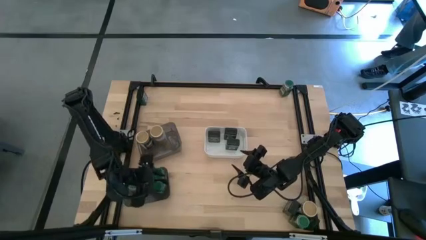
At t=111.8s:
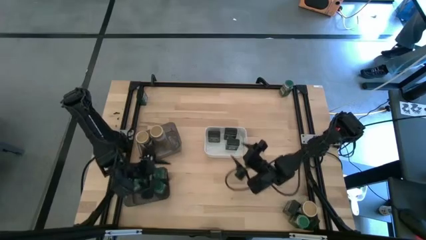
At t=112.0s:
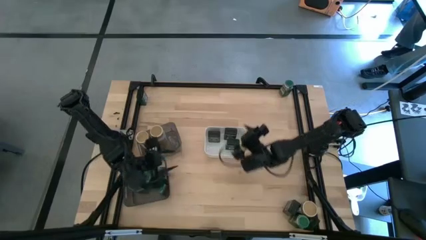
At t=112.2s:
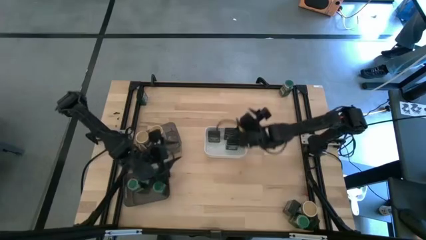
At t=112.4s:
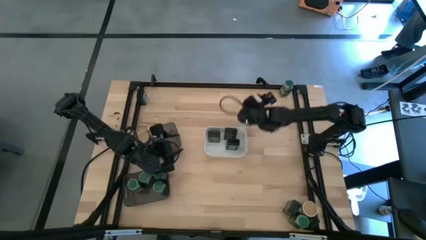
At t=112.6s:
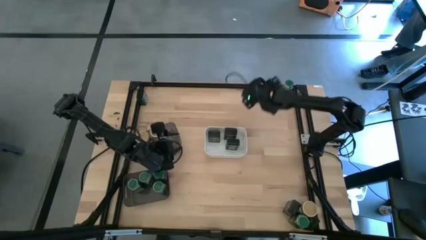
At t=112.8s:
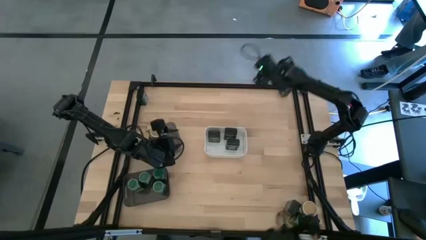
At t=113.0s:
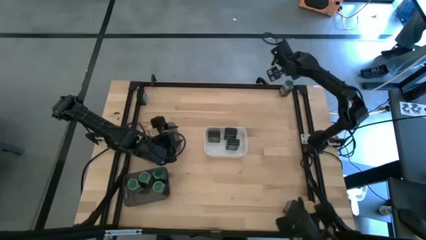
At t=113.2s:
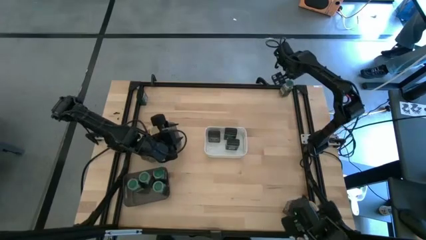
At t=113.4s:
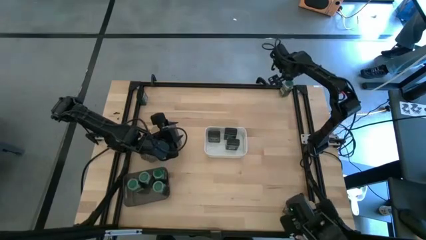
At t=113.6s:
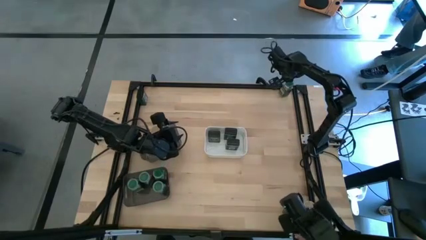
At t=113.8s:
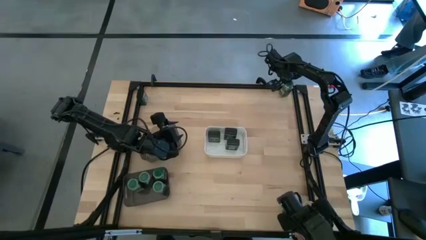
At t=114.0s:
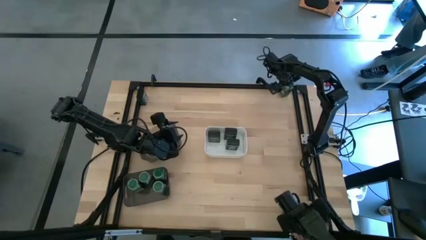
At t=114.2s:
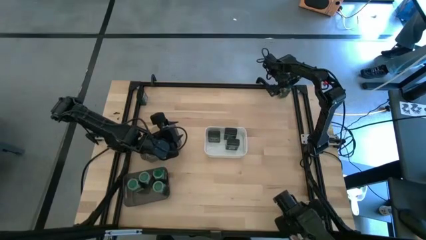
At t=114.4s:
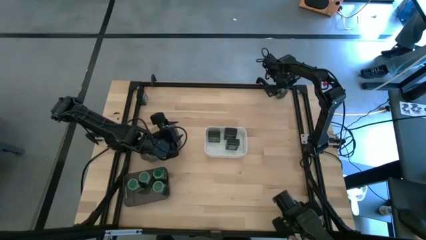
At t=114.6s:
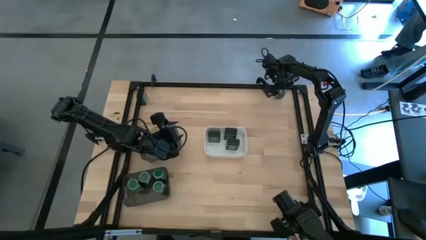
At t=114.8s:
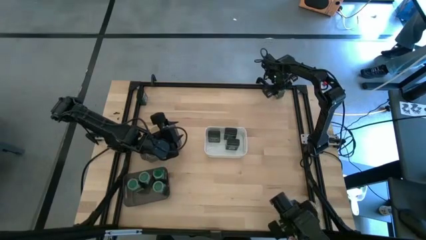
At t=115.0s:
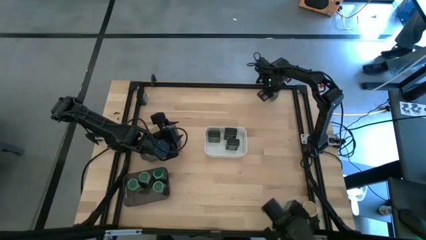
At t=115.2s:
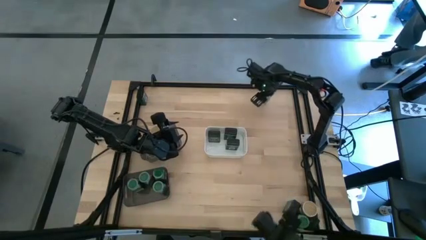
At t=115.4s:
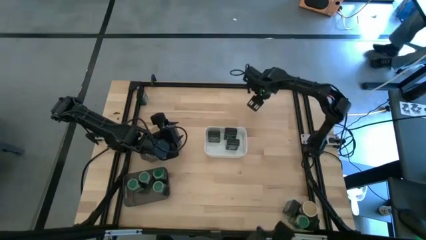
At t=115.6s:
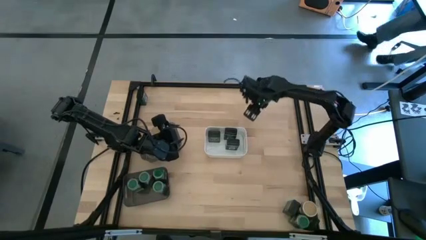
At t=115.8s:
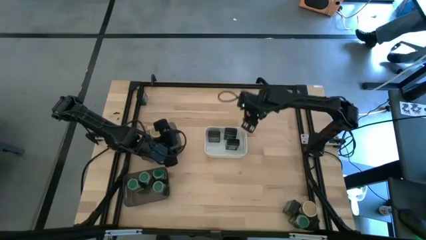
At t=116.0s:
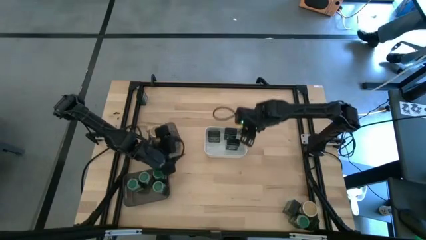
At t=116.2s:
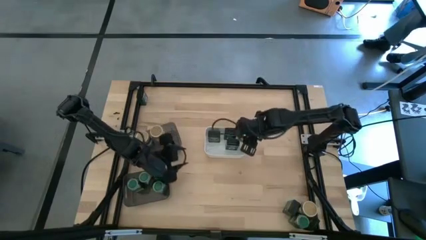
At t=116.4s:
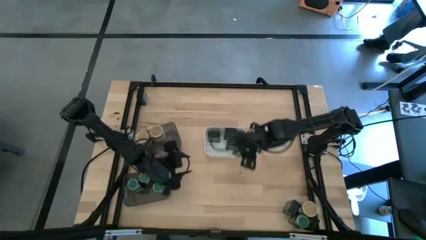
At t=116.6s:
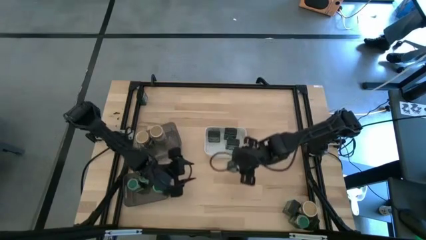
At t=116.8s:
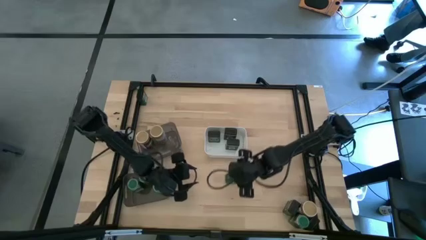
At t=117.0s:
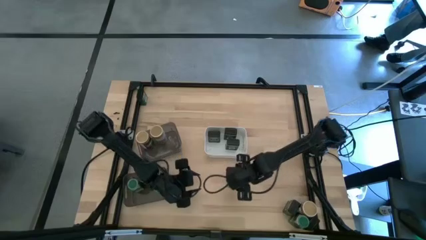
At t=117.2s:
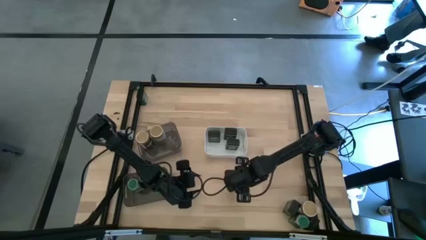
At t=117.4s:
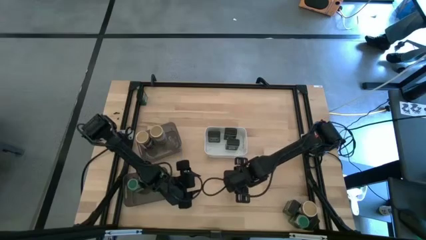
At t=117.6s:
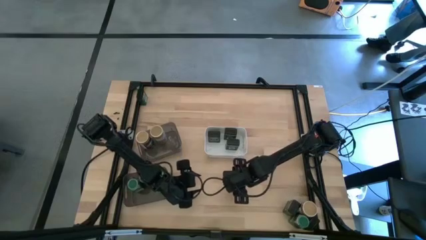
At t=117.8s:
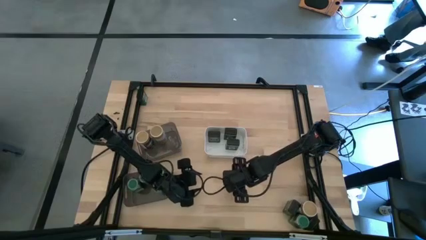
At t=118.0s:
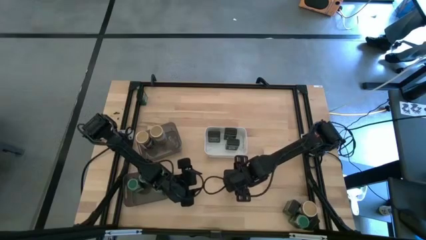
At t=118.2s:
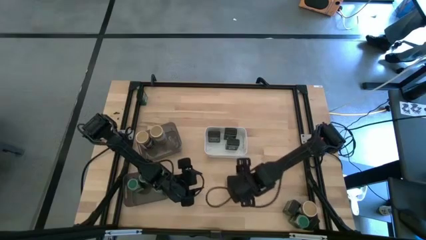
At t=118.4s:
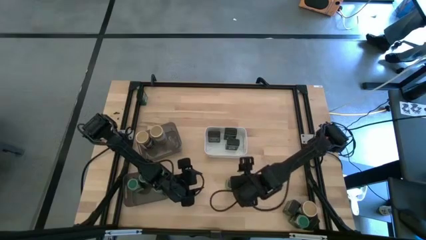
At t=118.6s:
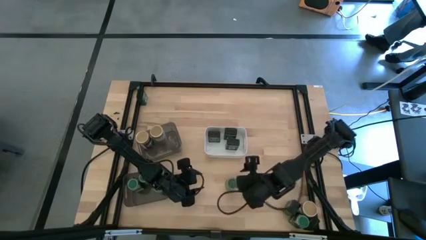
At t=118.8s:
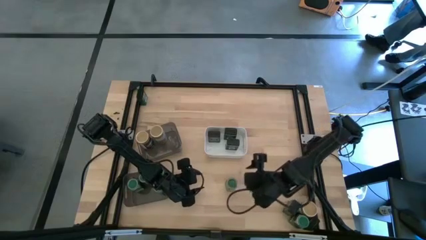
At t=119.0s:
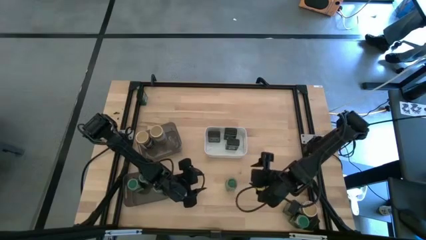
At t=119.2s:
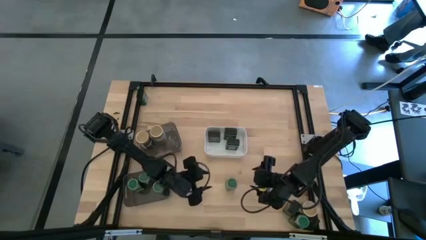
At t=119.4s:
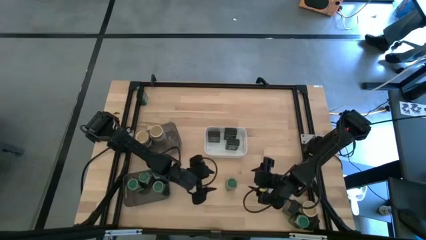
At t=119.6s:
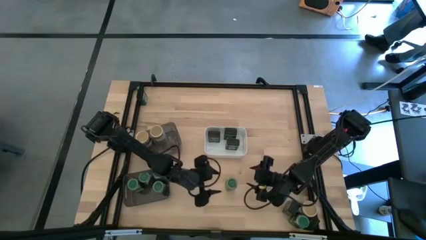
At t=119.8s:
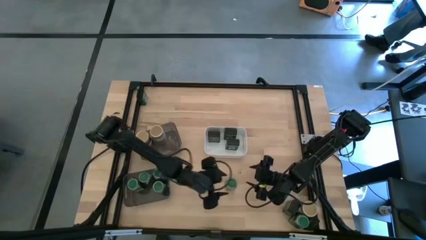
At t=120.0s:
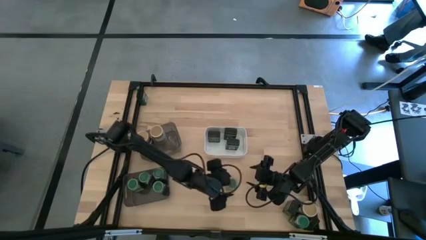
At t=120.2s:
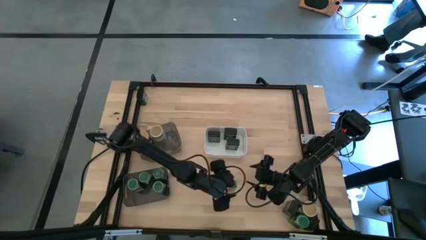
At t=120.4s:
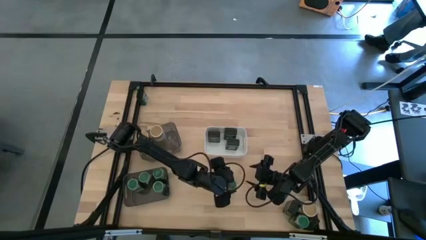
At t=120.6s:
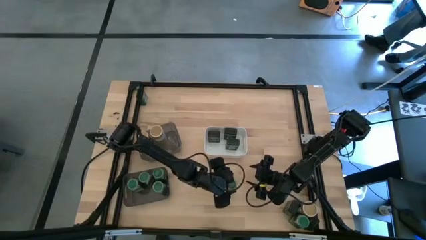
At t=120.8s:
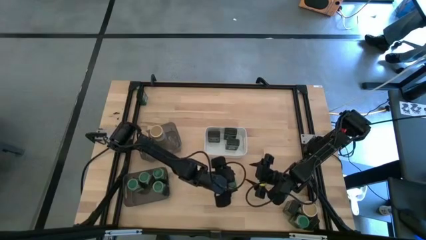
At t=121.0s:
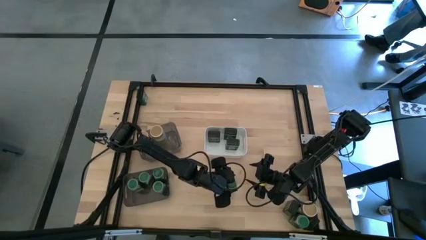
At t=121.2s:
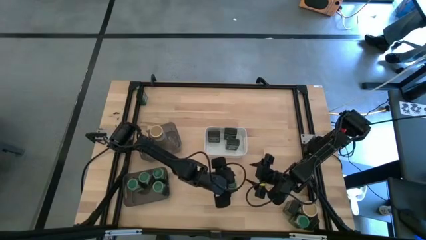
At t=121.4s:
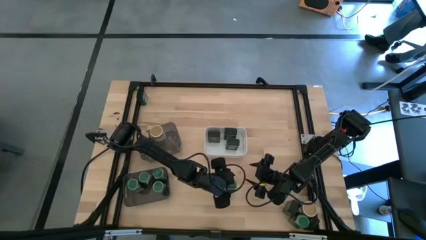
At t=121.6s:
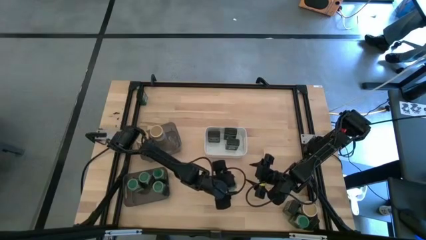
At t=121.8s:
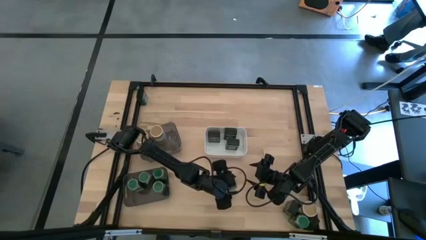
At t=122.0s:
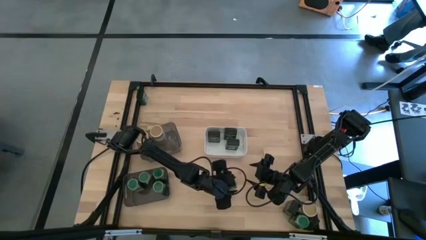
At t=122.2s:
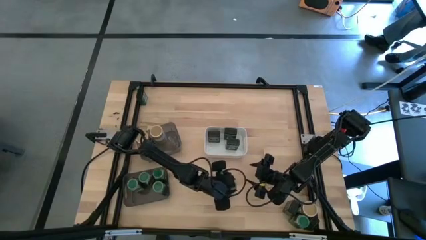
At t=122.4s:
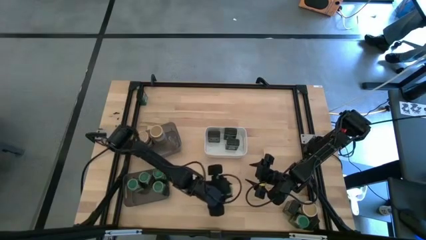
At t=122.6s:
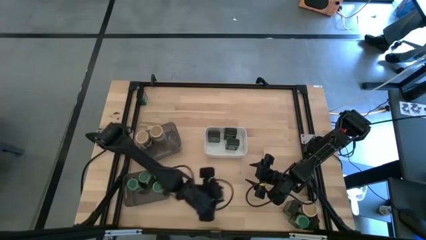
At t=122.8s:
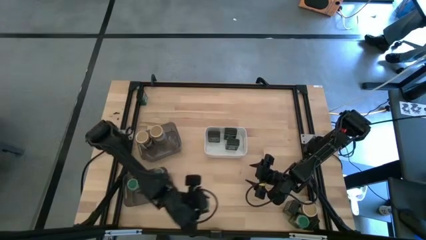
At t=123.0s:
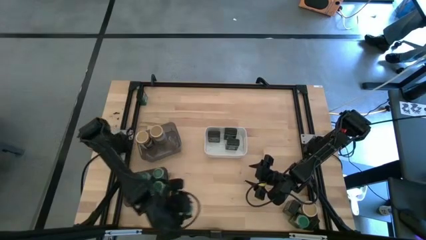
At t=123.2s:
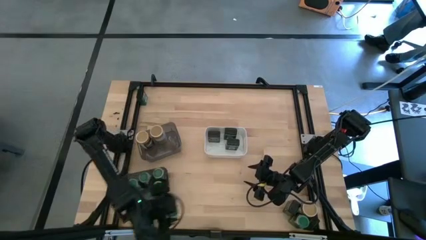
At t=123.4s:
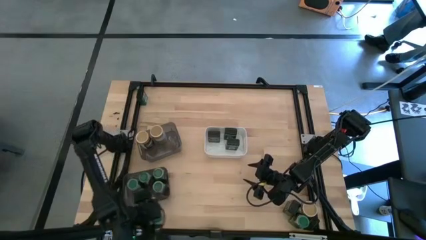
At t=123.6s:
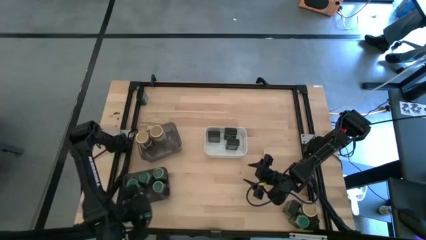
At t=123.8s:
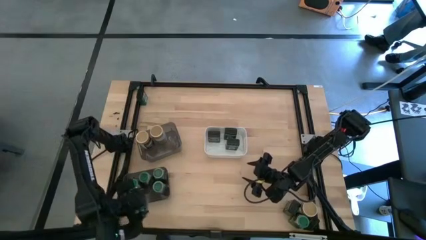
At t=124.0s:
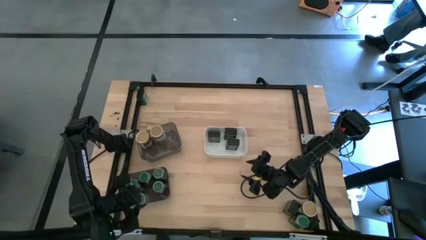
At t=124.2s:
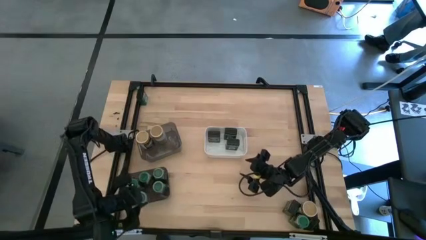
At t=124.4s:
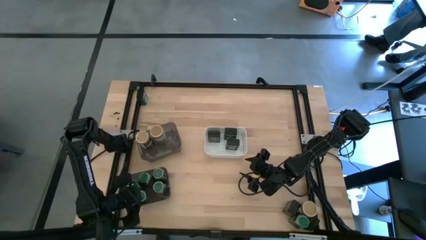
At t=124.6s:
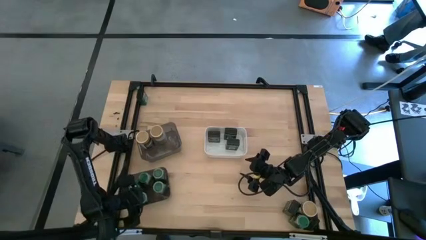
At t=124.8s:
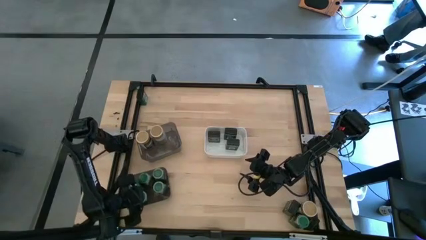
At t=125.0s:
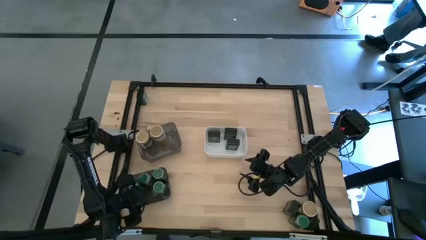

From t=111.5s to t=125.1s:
Task: Sort spices by type
Put the green seasoning bottle into the bottom black bin
